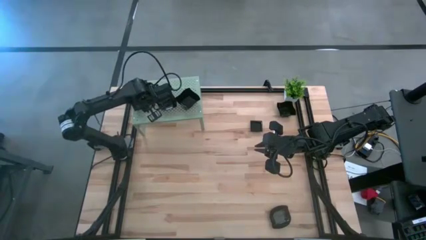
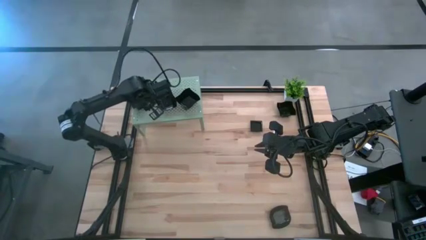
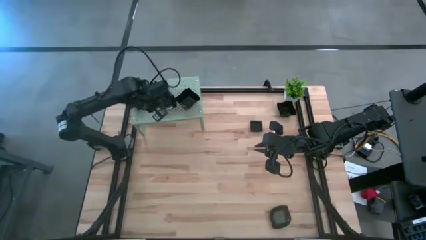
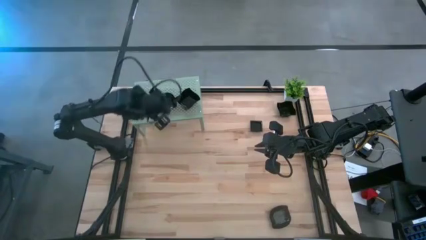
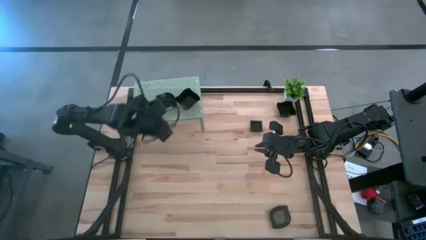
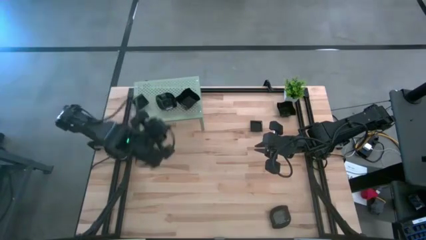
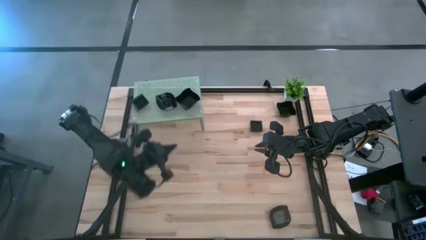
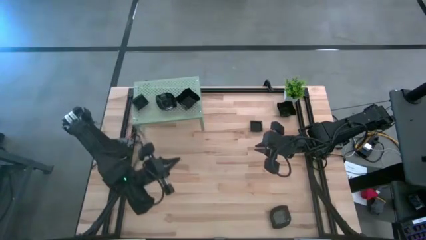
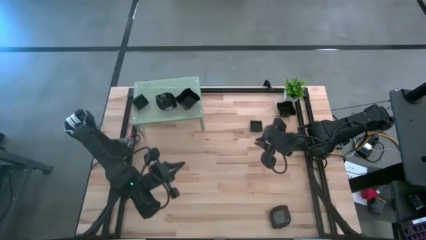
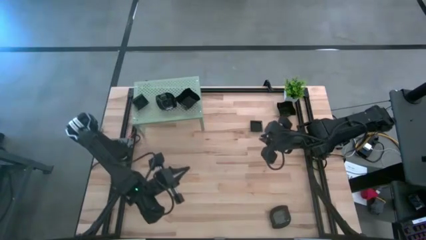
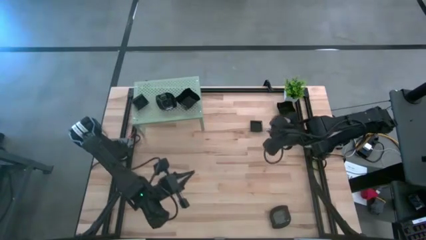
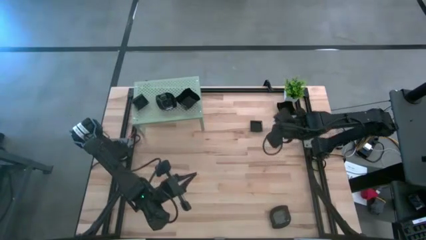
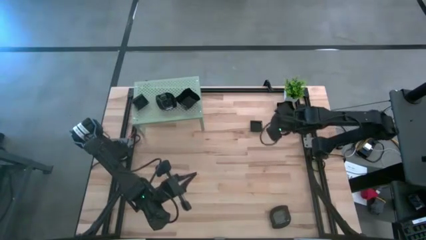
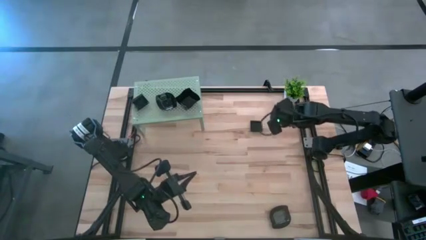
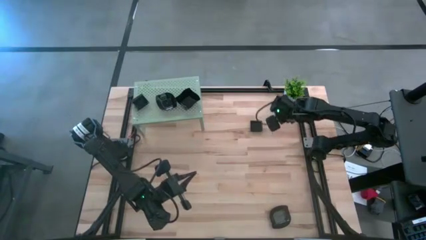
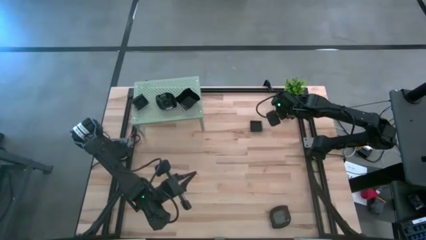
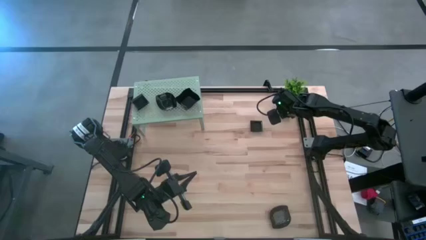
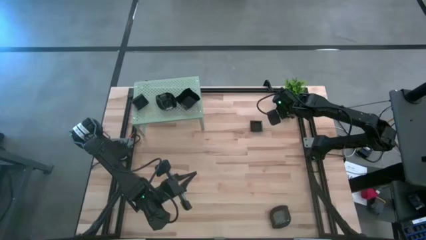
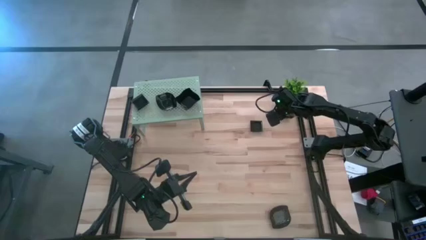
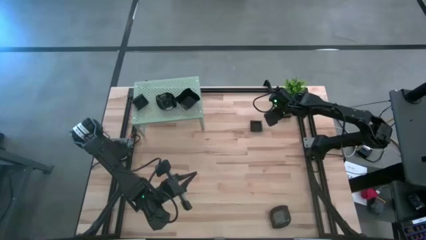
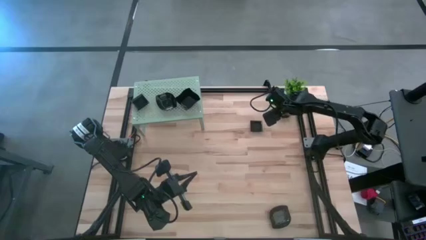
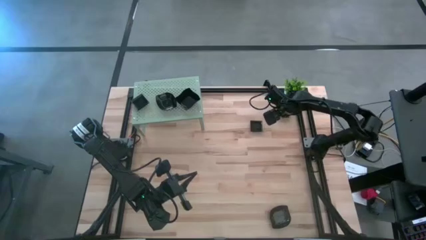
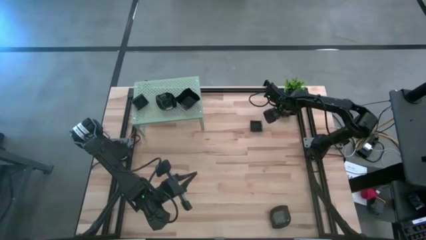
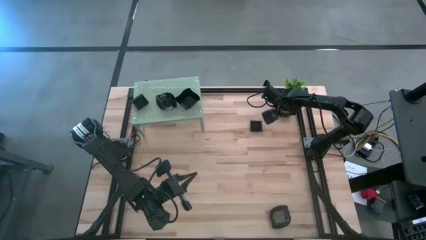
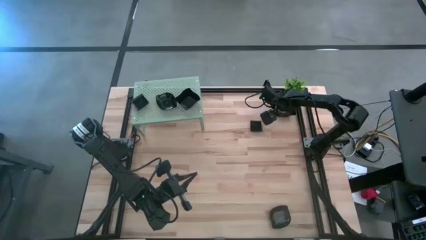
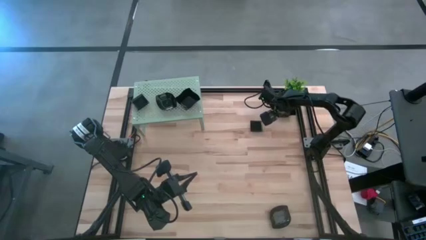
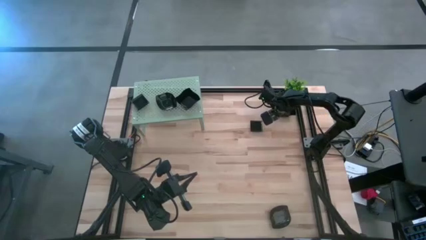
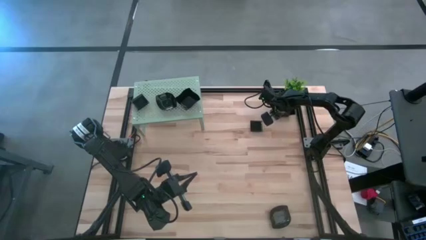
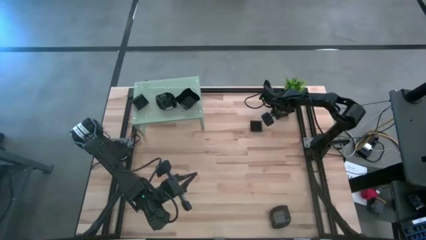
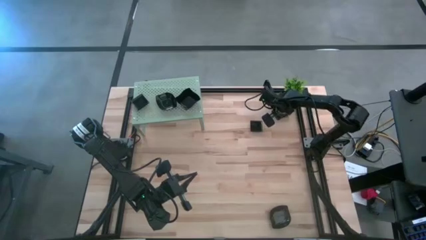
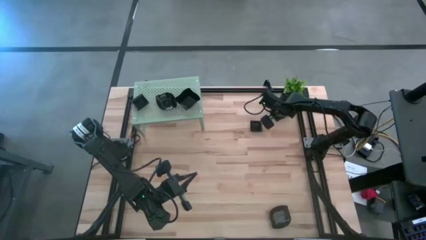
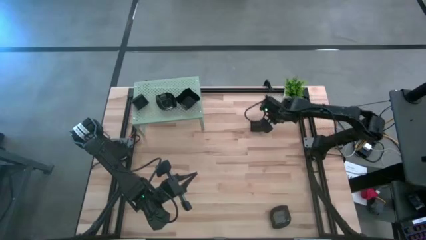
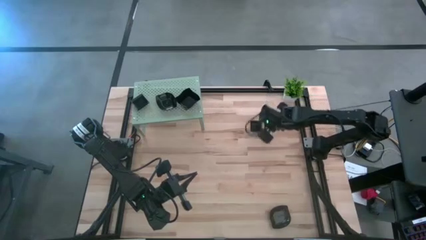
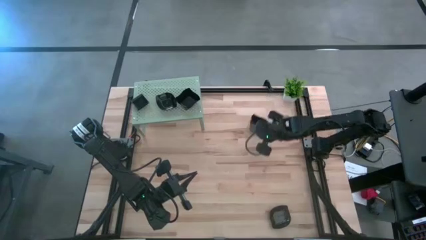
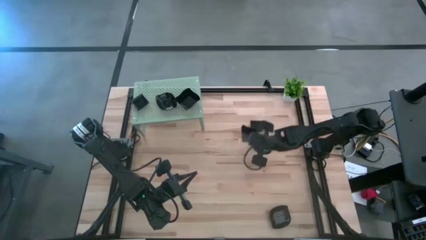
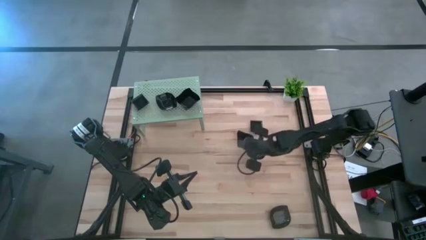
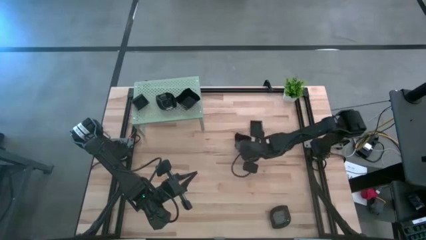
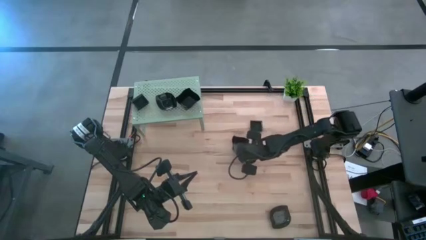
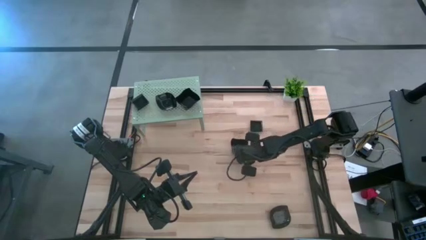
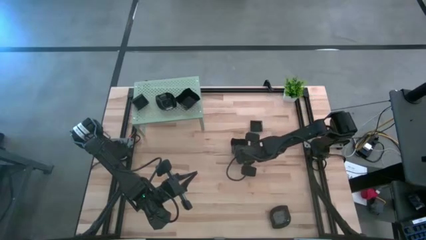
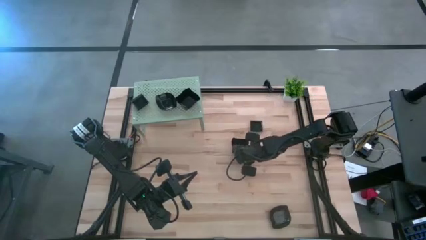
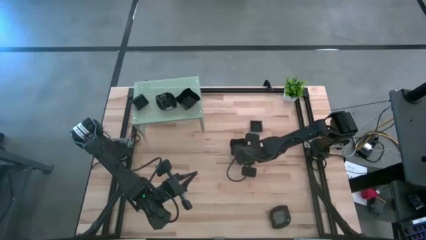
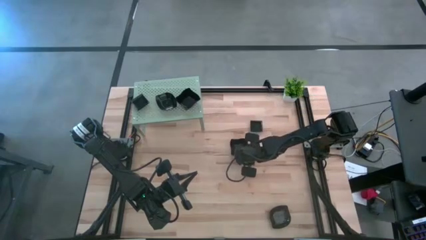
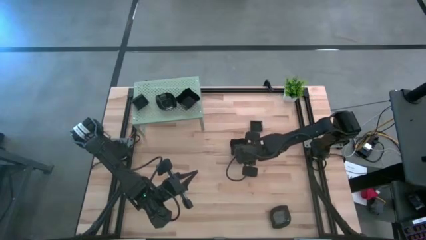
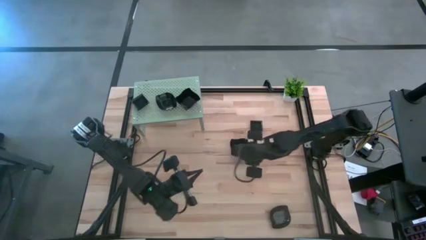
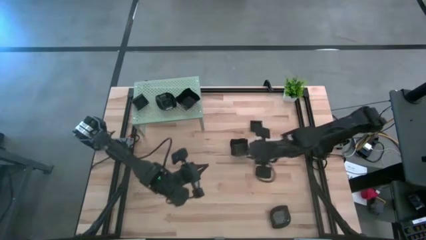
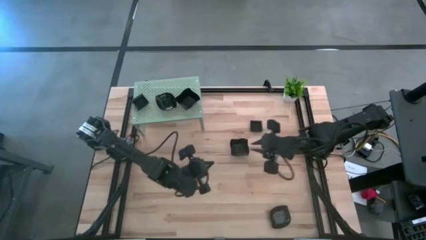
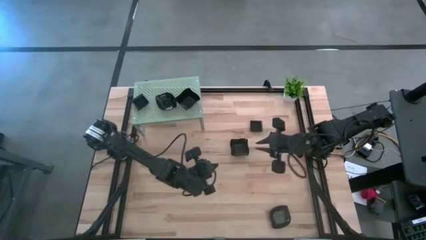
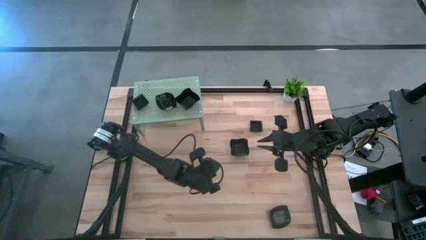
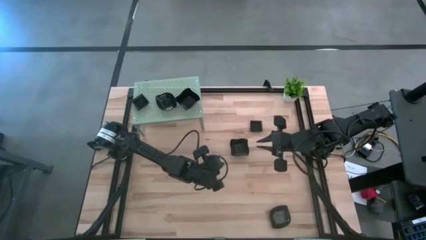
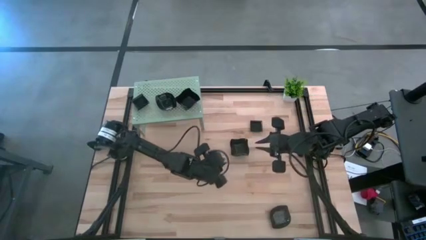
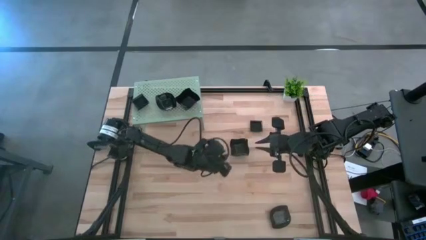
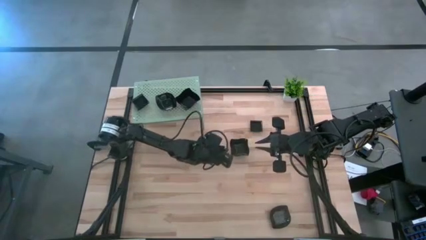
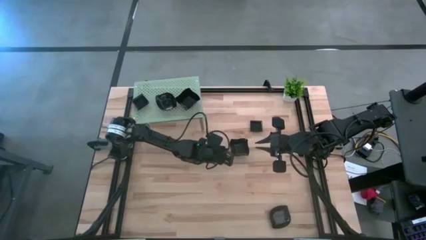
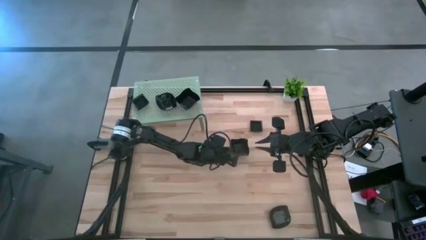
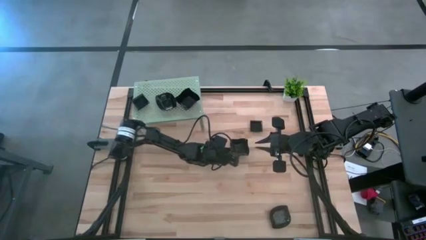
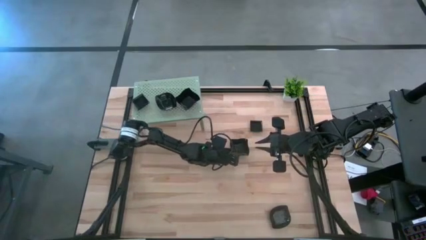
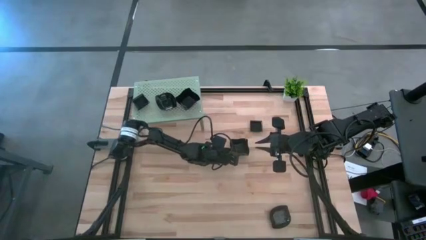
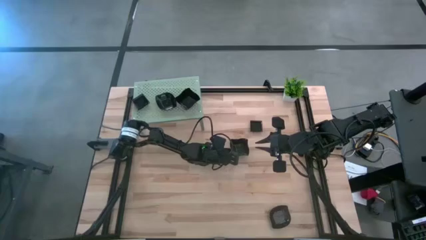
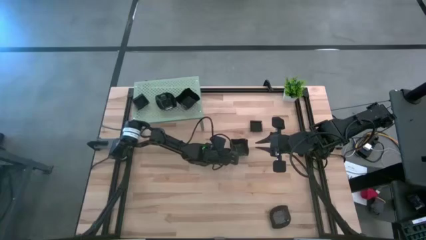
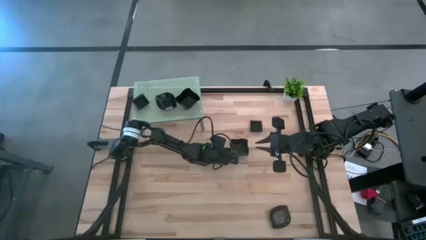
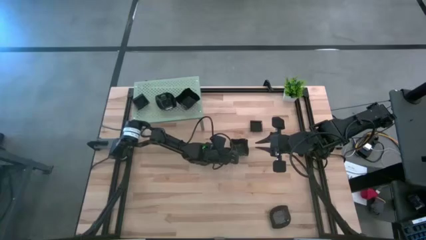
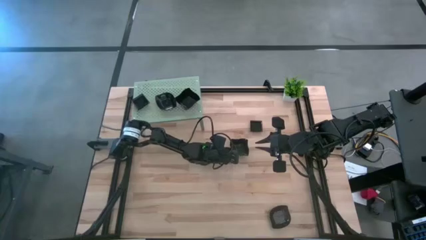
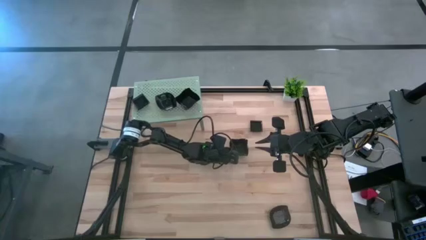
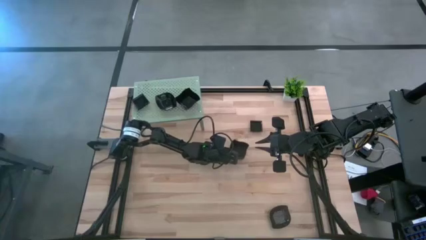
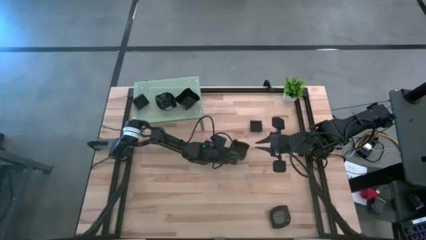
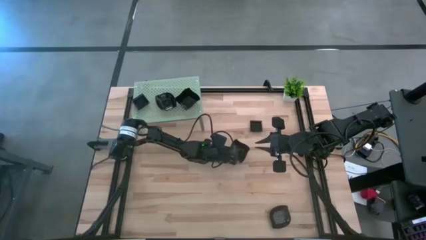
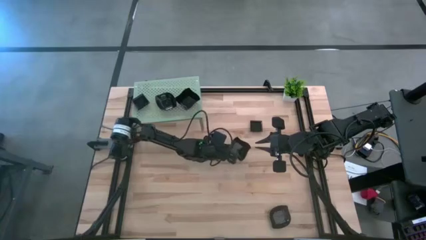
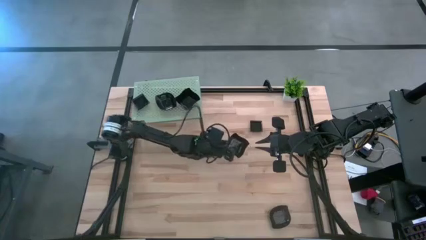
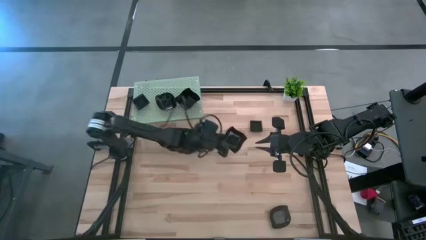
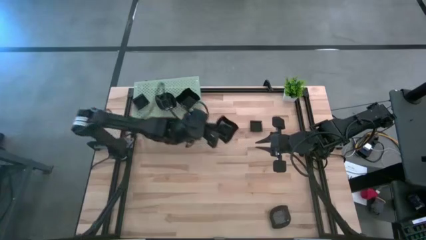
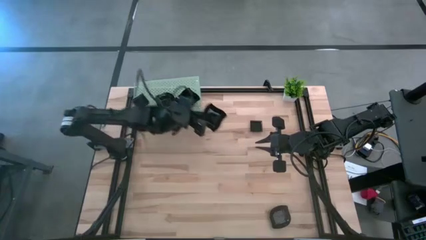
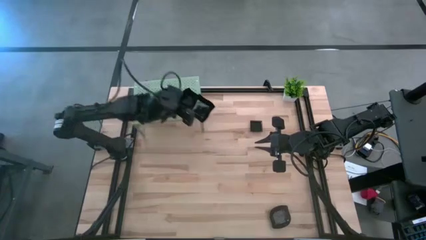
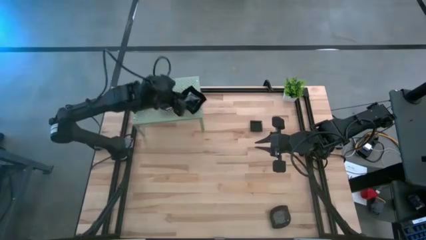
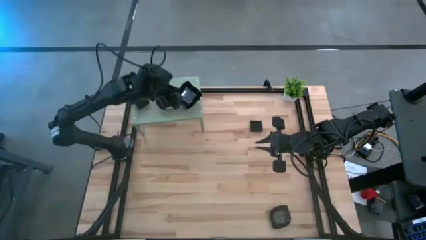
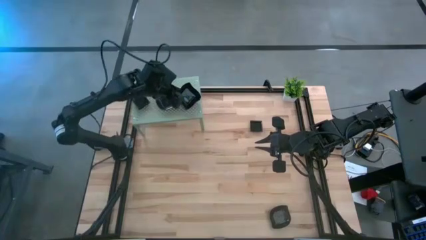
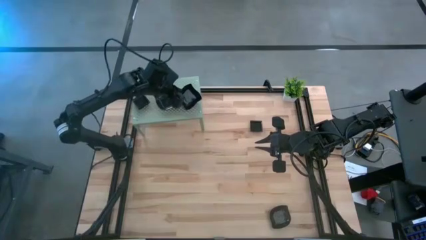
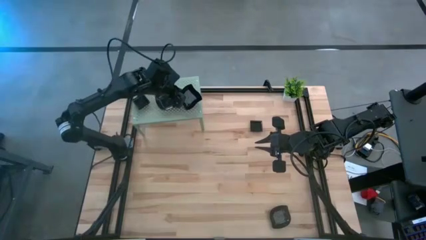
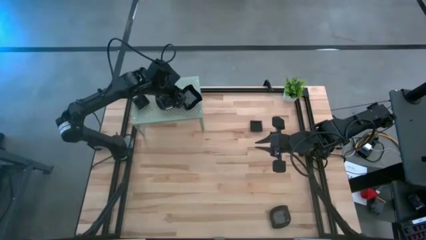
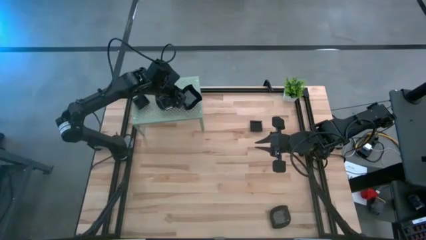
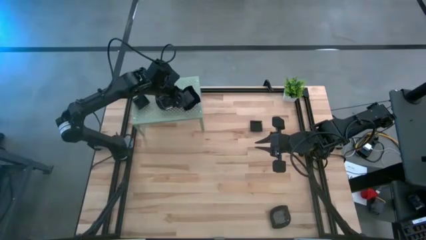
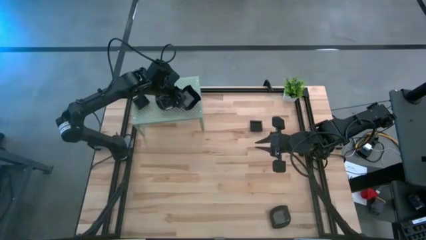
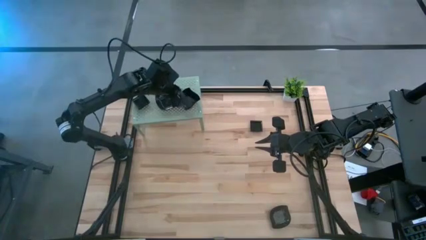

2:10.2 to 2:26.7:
Task: Pick & Place Mini shaped plates
Stack the black wave square shaped plate on top of the wave square shaped plate on the shelf
